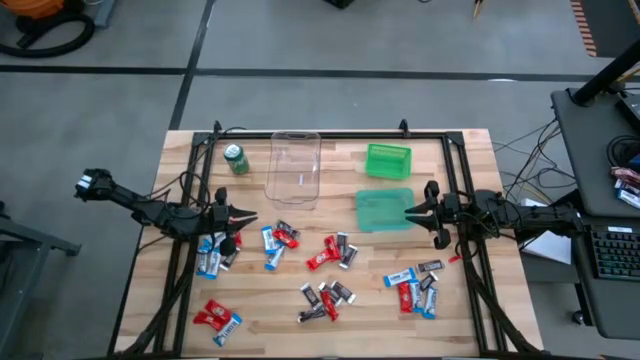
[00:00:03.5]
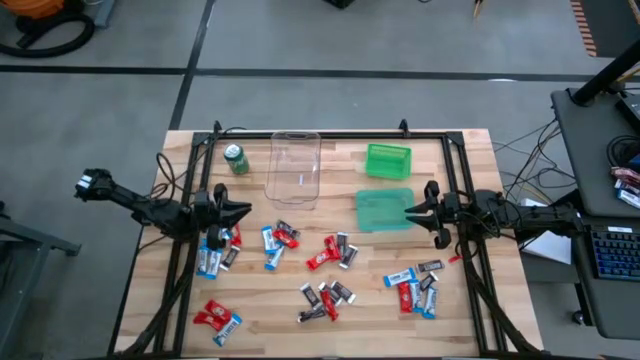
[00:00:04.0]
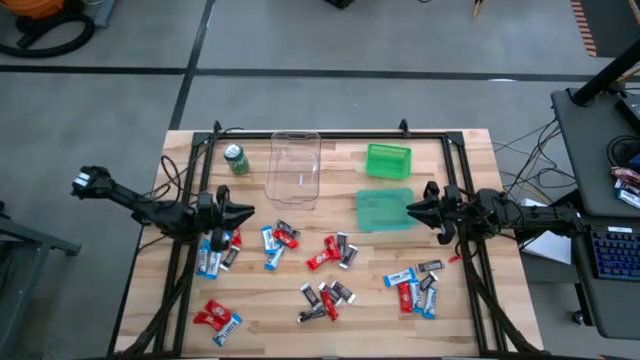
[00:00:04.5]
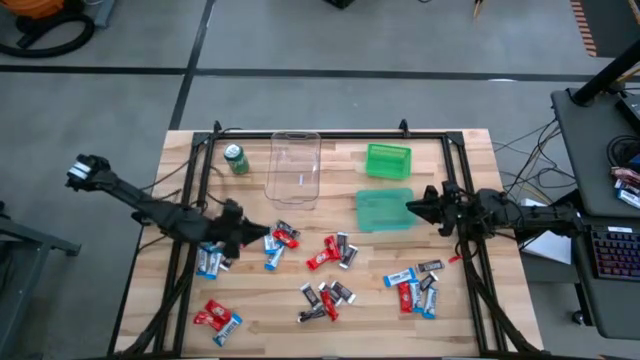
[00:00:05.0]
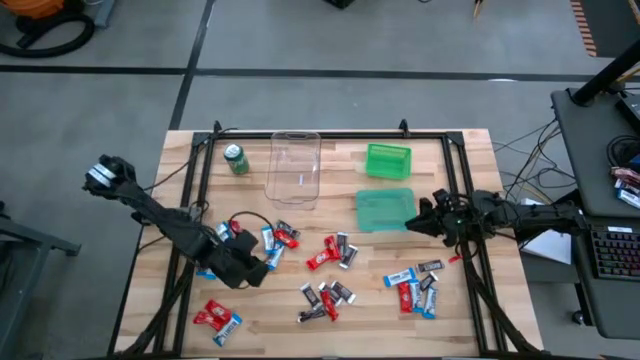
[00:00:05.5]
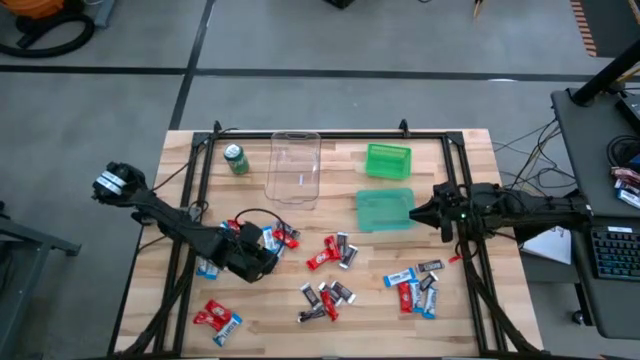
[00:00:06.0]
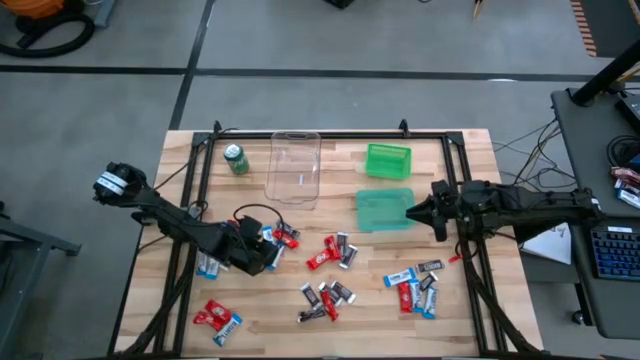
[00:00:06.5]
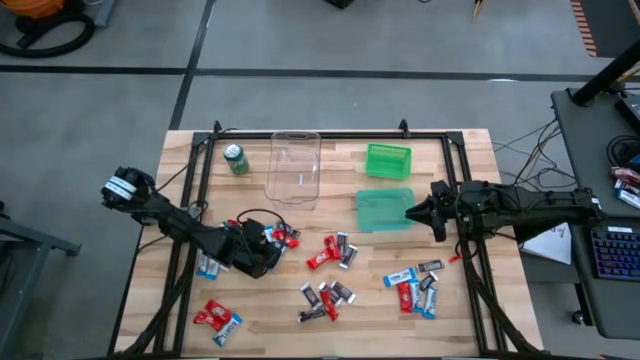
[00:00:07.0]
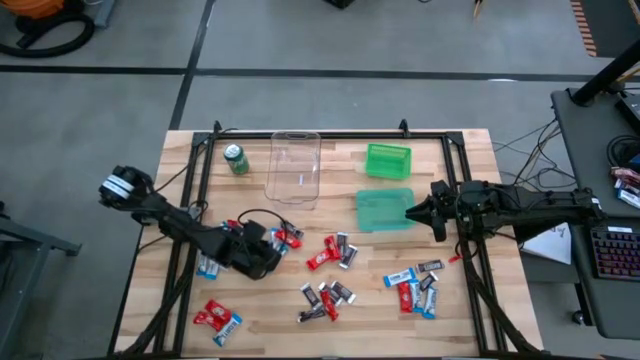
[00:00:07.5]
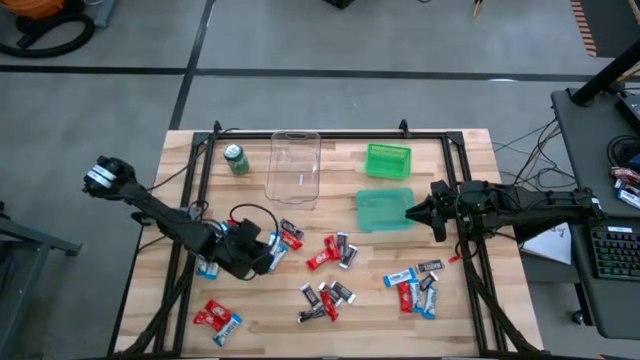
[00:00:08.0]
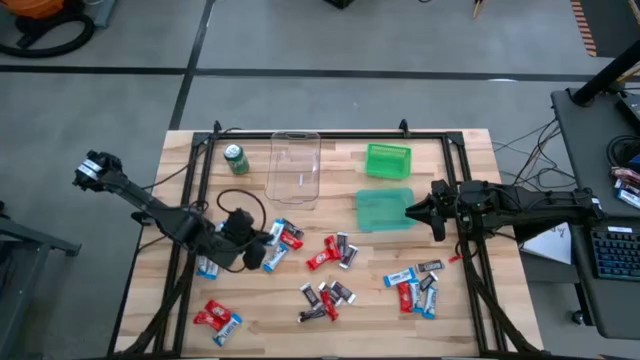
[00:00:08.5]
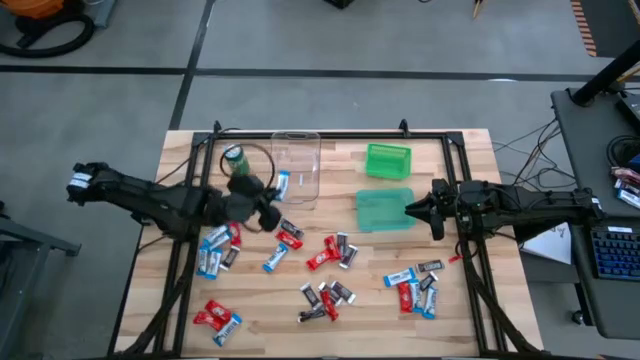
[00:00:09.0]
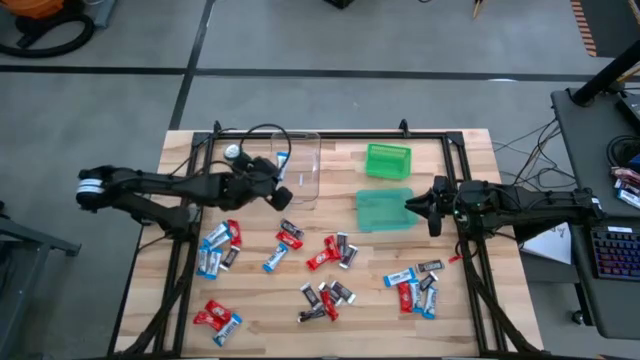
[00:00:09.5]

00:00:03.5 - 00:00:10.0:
Task: Sort candy
Put the white candy into the transparent bin

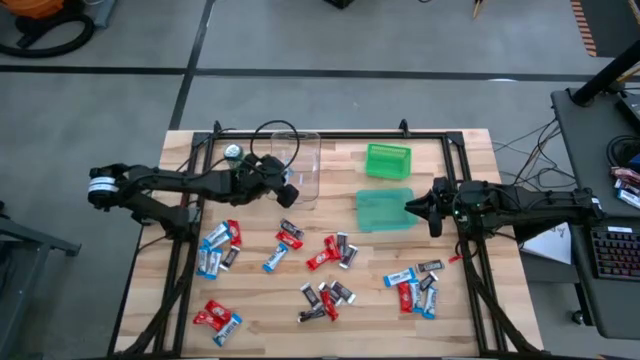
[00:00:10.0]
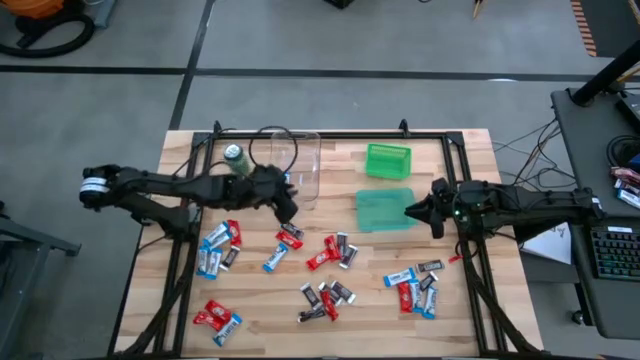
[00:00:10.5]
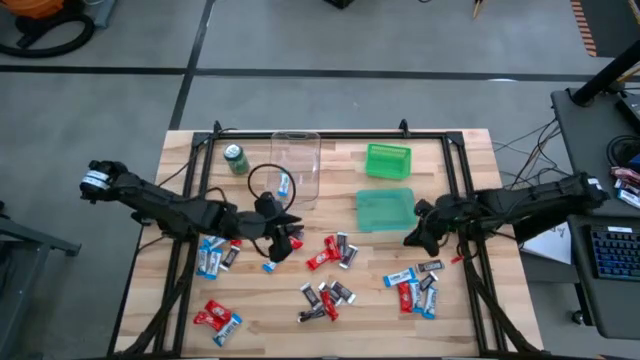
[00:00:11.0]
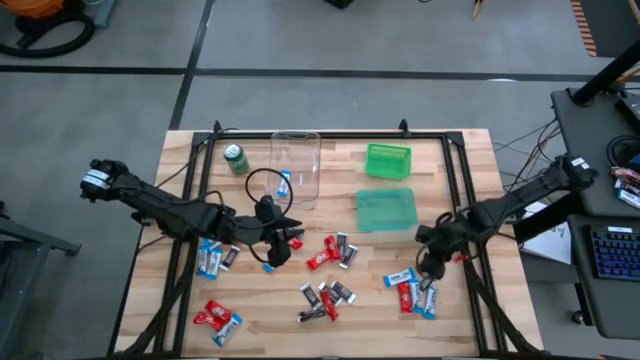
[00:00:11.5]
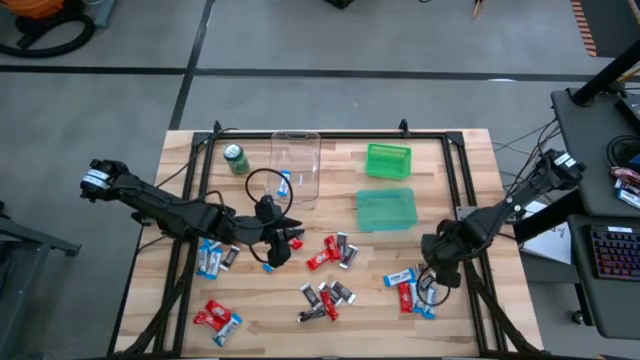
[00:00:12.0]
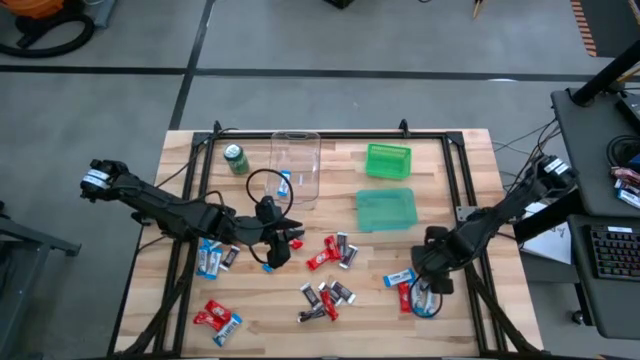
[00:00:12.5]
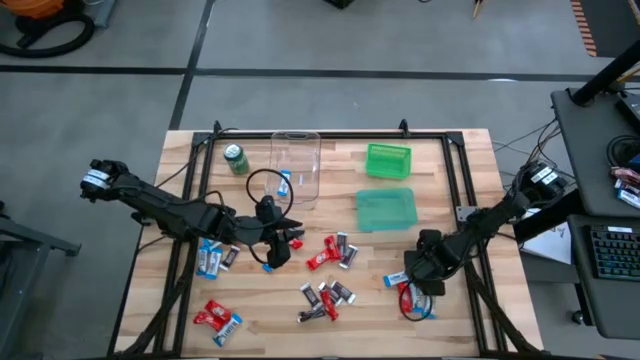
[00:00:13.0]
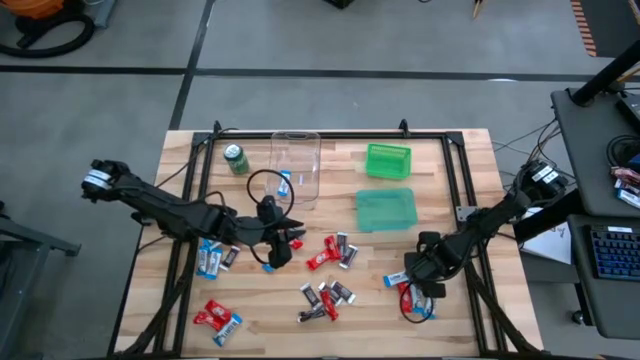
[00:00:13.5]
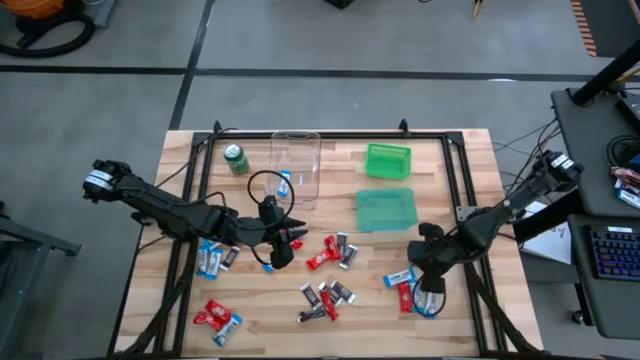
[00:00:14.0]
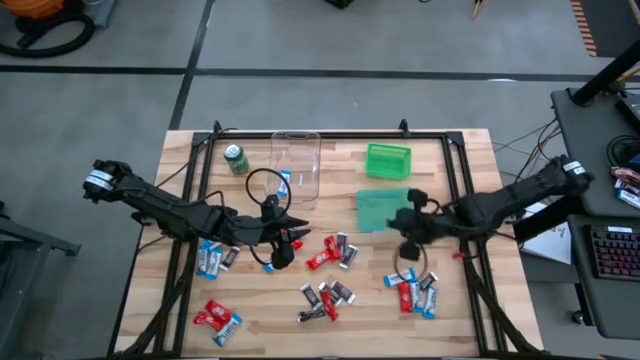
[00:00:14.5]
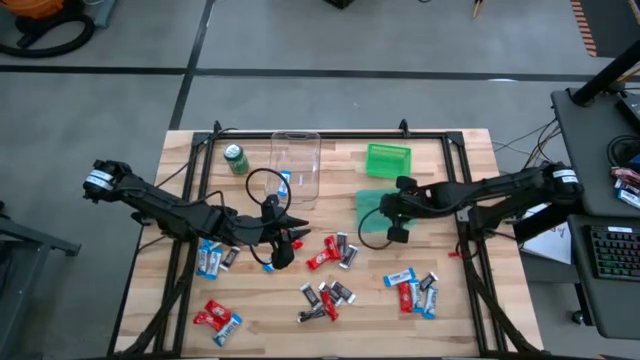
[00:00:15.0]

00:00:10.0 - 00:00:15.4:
Put the brown candy into the blue bin

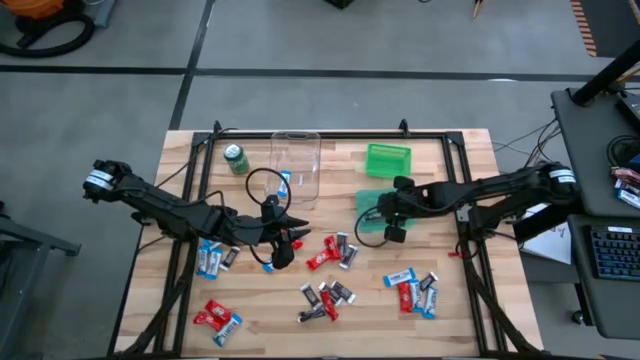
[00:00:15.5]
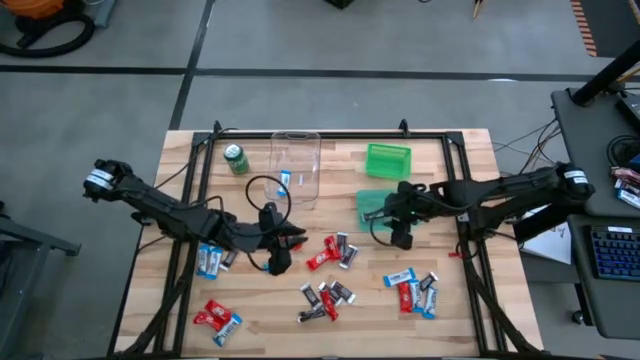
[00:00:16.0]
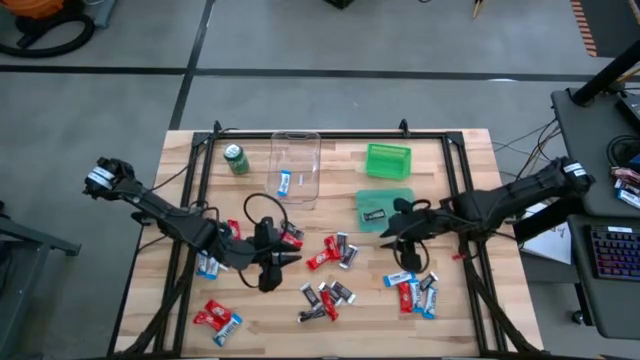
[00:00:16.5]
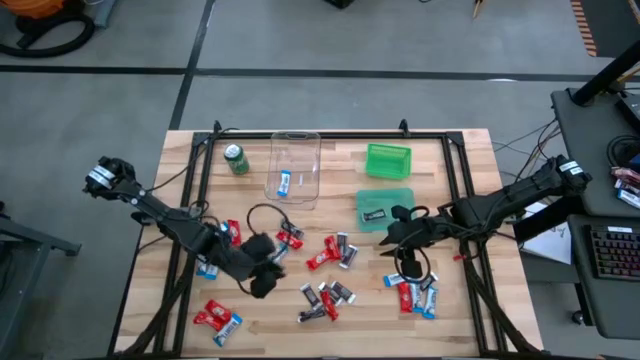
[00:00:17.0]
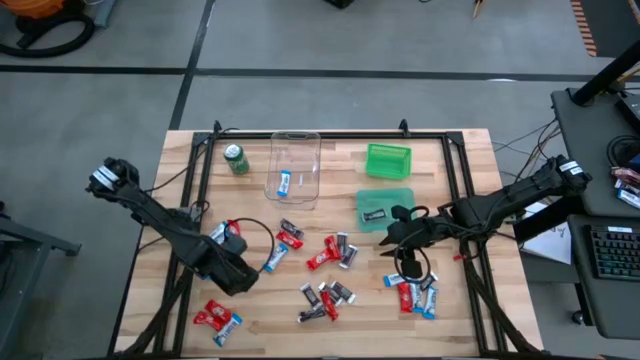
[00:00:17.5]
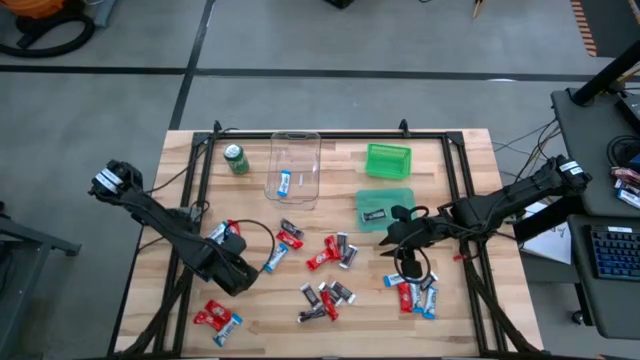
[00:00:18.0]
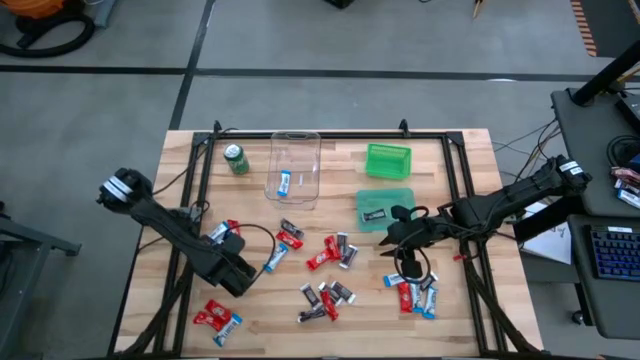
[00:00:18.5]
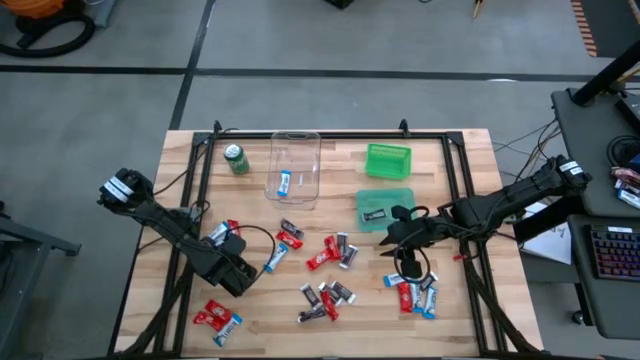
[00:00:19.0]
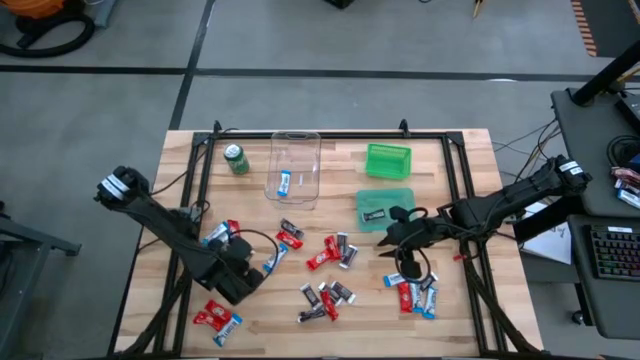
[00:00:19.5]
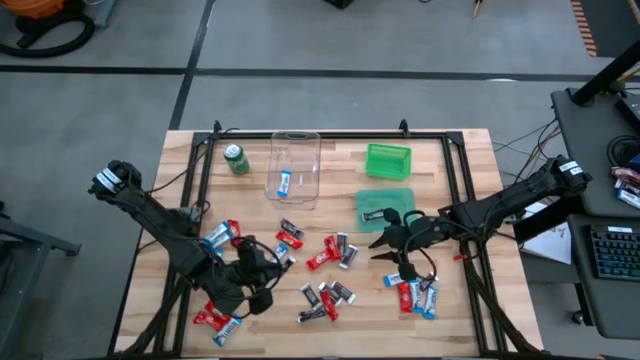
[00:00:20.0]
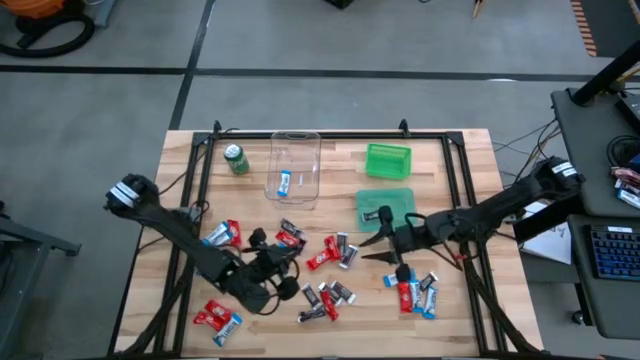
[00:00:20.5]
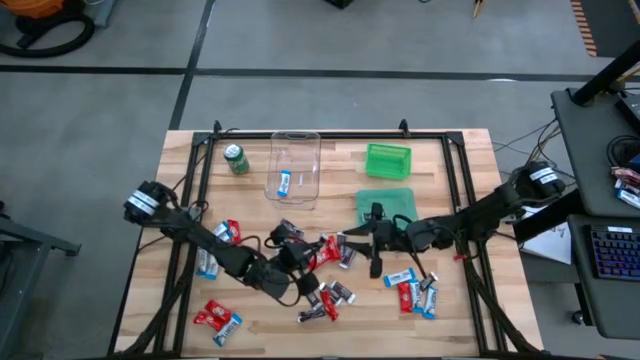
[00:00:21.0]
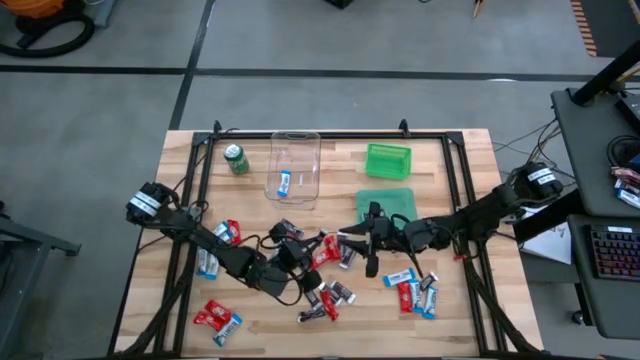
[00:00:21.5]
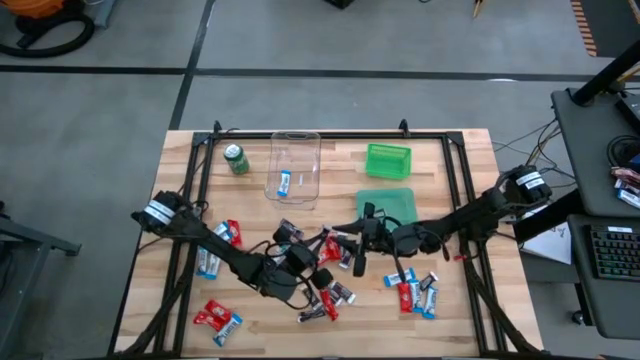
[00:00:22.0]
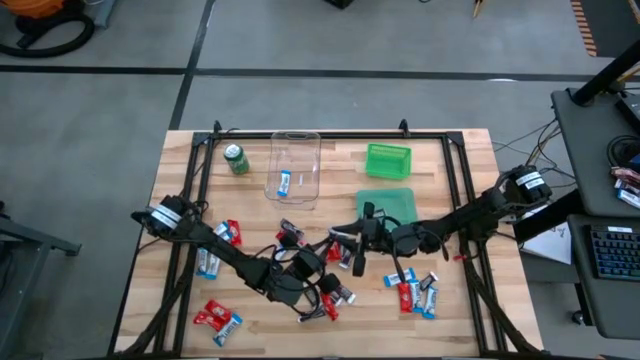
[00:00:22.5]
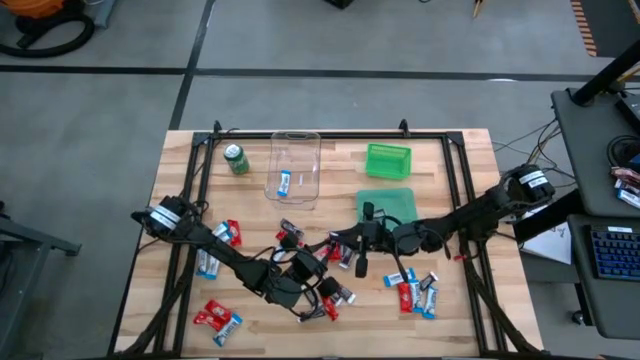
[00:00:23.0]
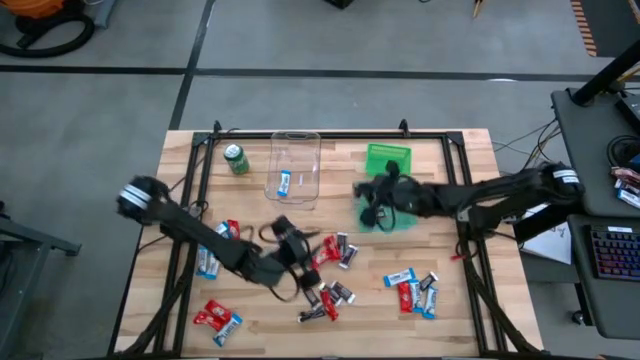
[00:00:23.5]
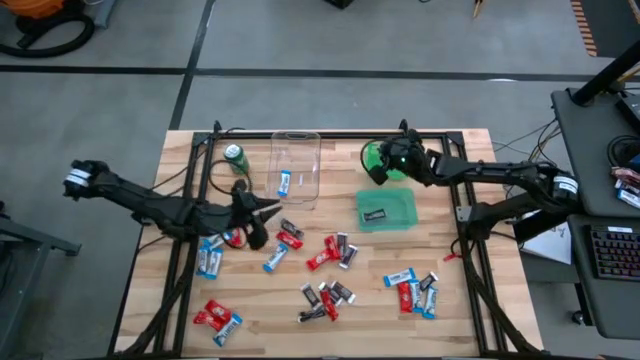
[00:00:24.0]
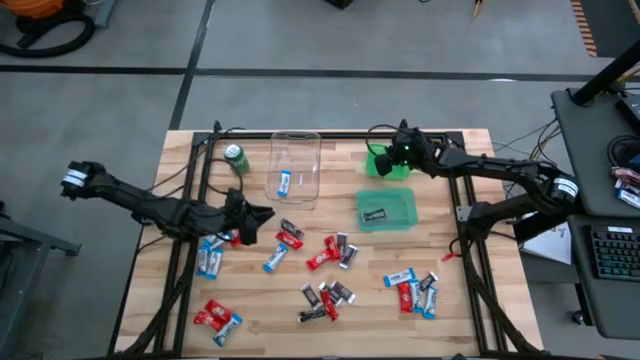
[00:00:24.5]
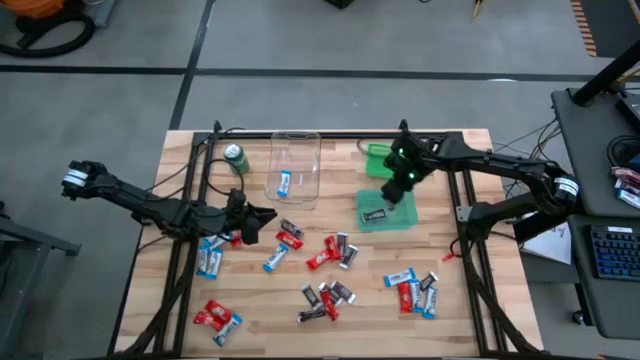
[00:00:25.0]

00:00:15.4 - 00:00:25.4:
Put the brown candy into the blue bin
